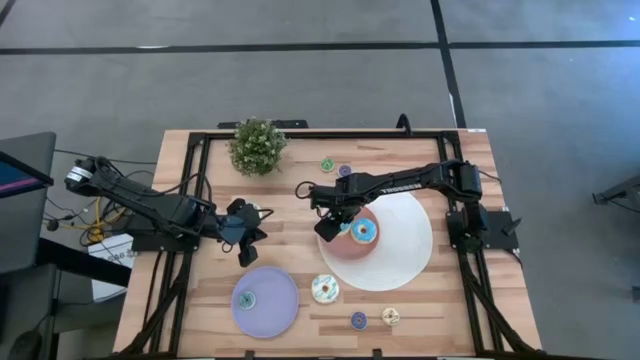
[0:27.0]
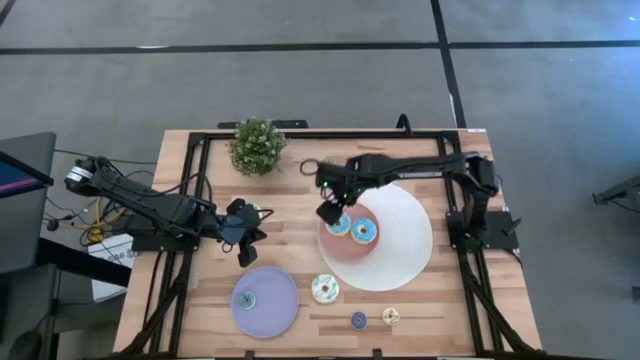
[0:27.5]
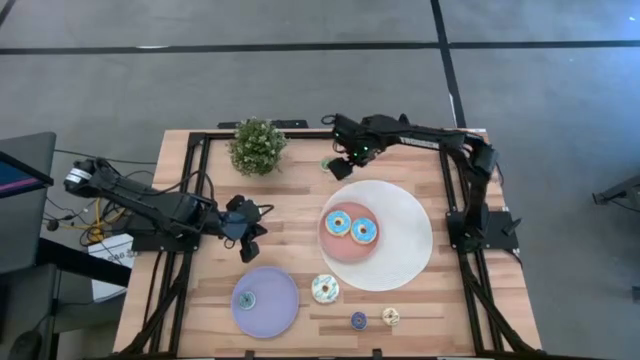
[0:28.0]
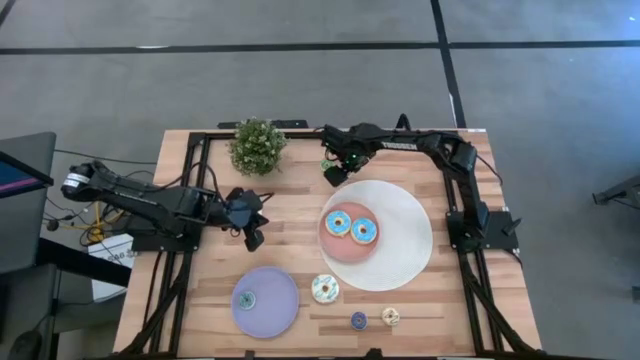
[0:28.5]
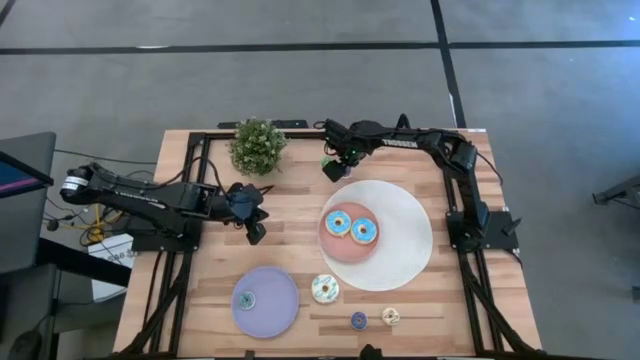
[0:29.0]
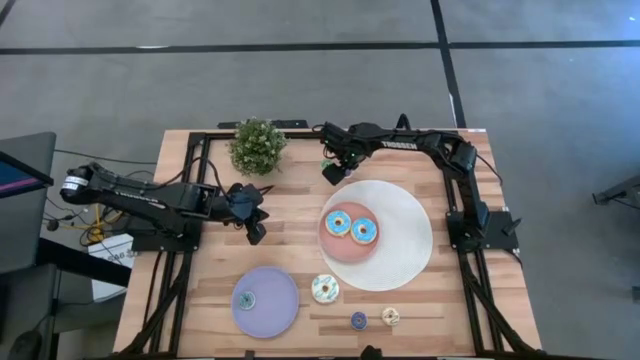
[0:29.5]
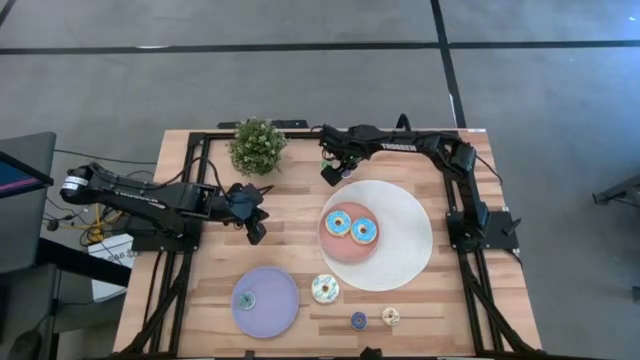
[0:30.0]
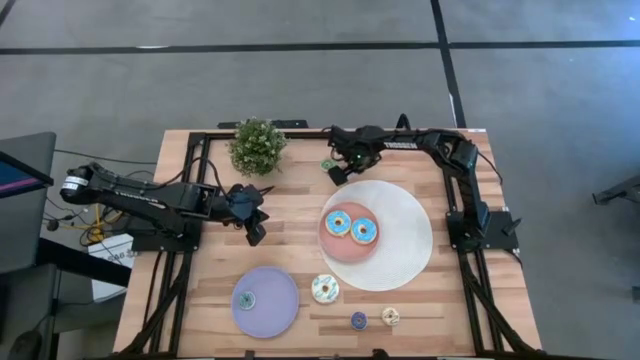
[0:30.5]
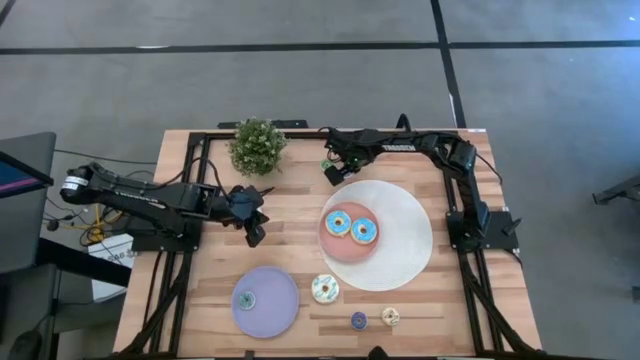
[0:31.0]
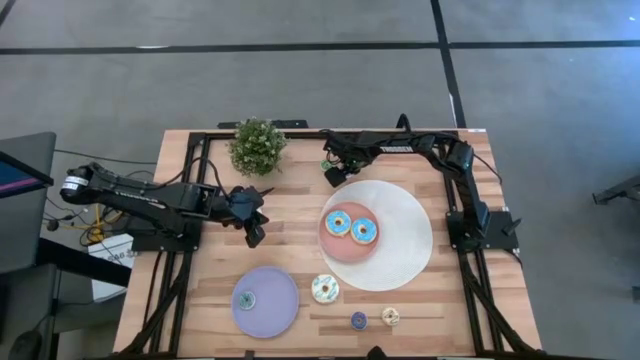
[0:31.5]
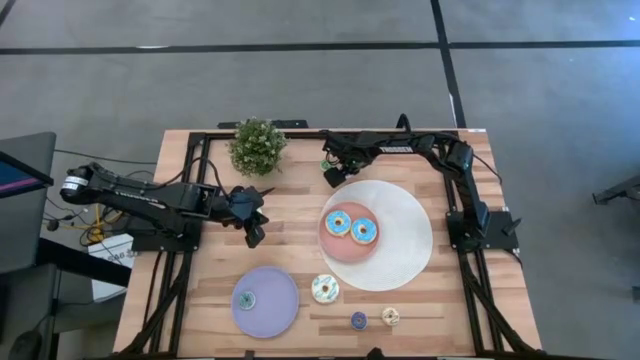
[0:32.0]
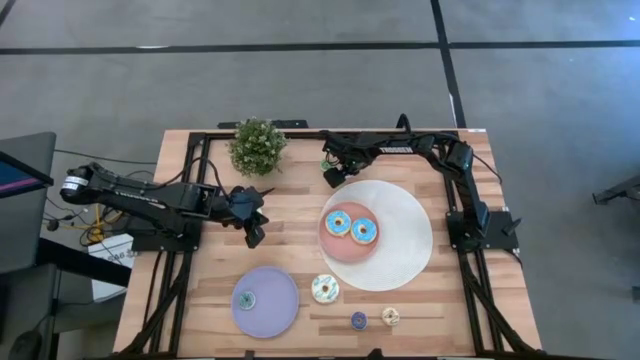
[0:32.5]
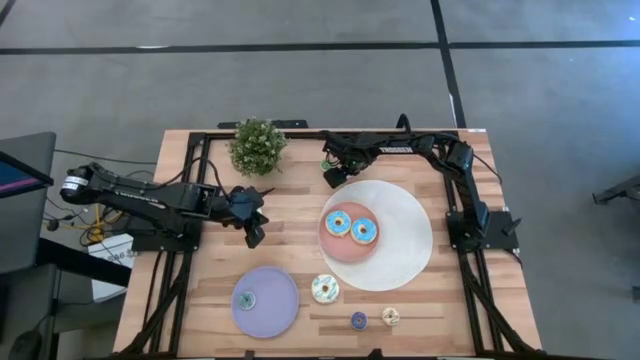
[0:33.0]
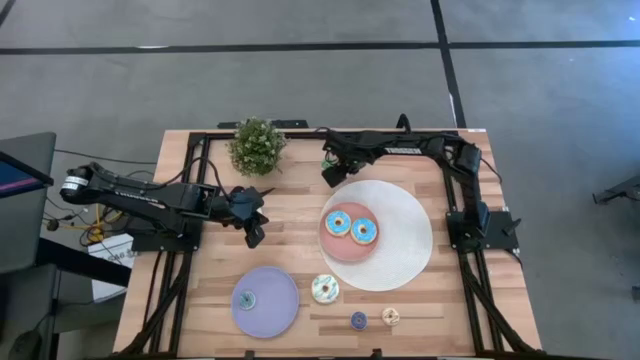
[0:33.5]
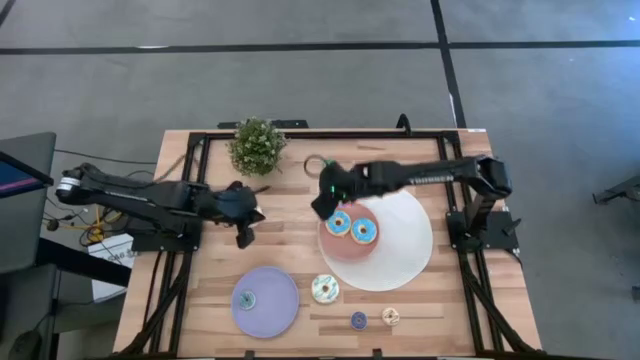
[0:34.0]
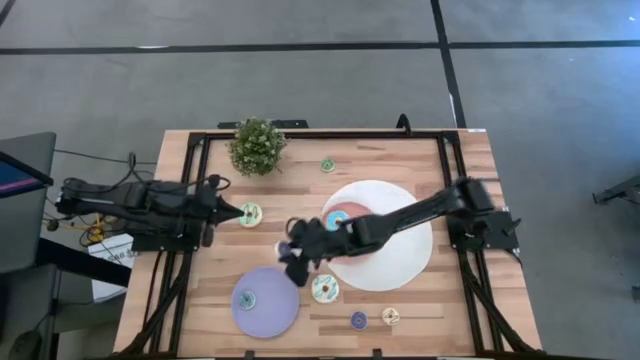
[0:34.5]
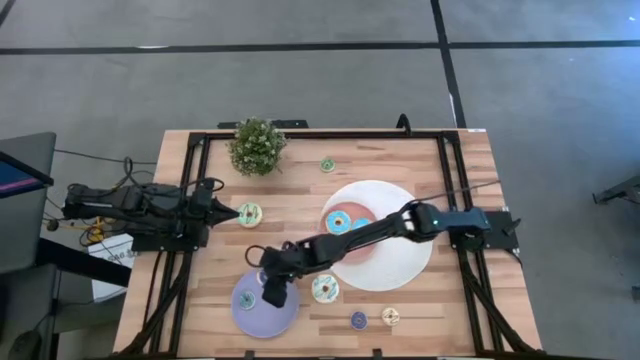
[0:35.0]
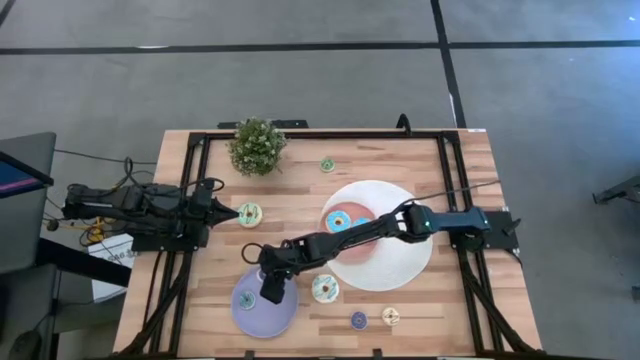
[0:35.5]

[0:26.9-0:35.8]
Task: Pick & Place donuts
Put the small blue donut on the purple plate

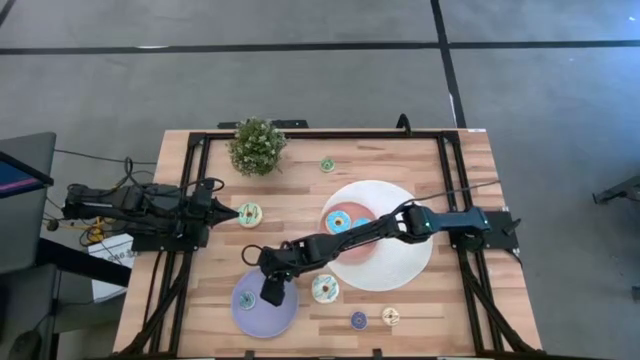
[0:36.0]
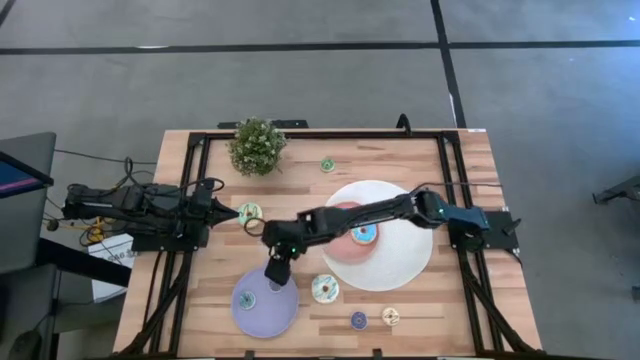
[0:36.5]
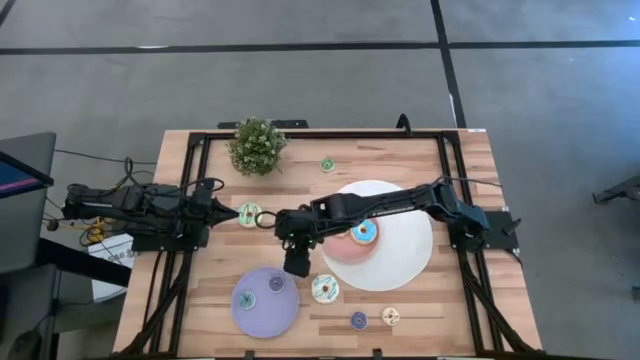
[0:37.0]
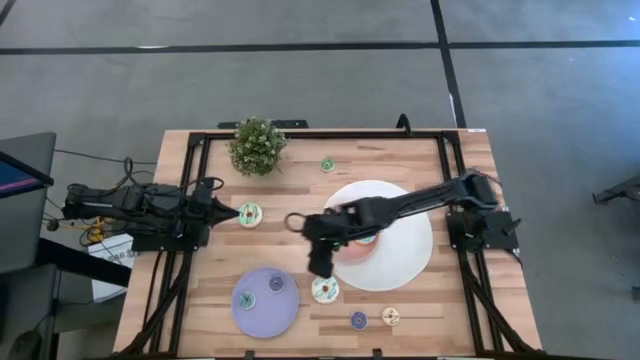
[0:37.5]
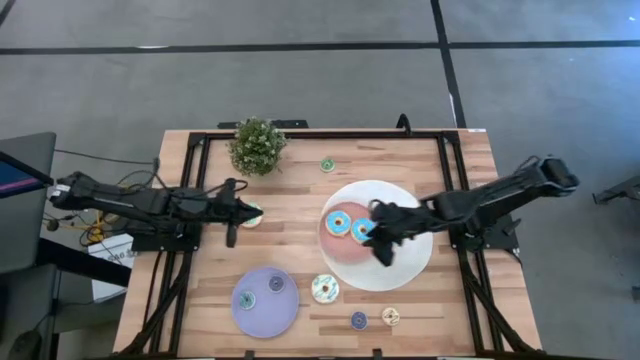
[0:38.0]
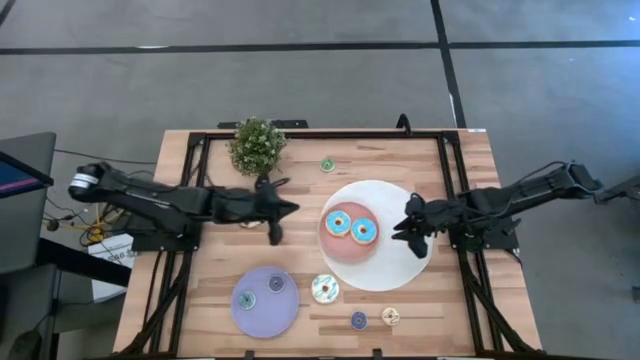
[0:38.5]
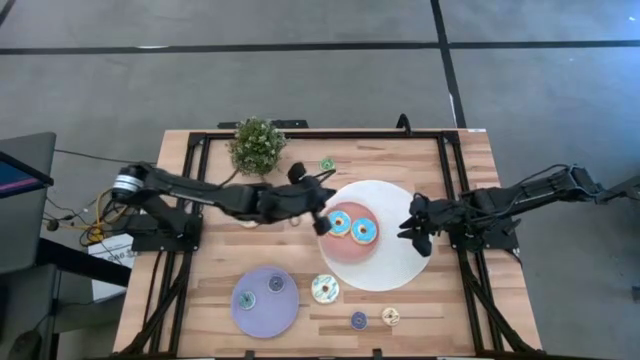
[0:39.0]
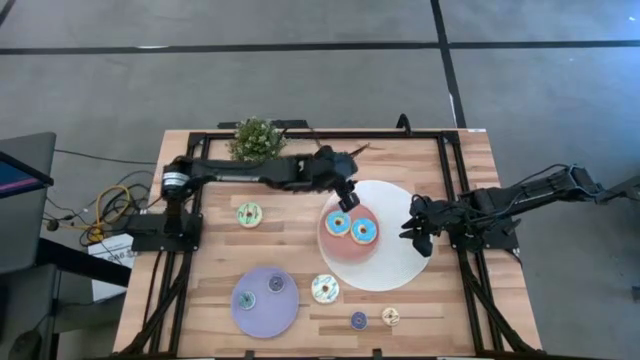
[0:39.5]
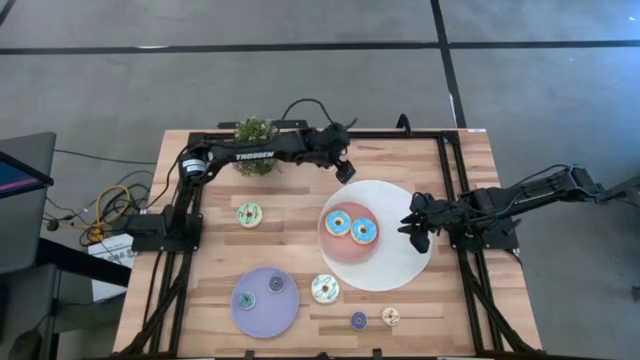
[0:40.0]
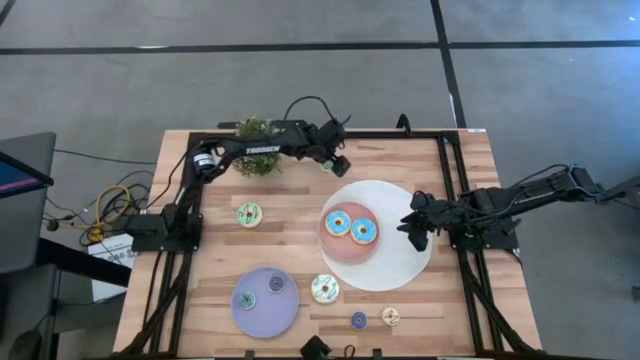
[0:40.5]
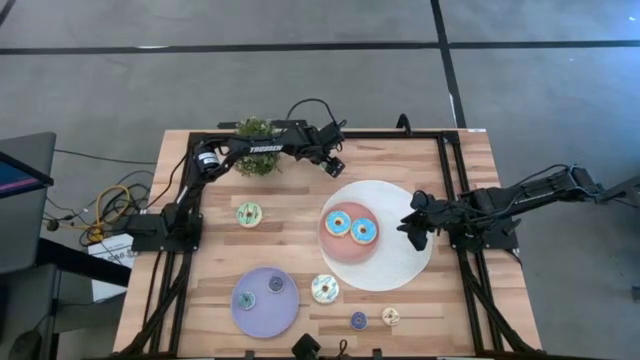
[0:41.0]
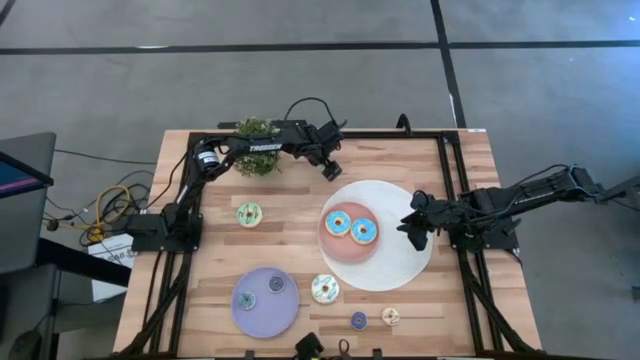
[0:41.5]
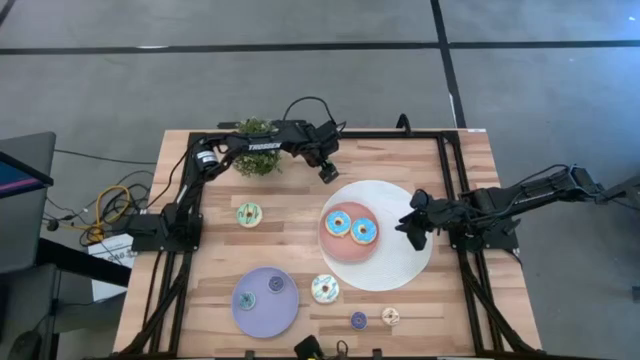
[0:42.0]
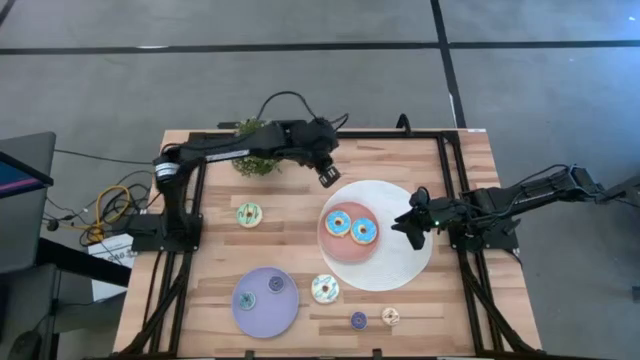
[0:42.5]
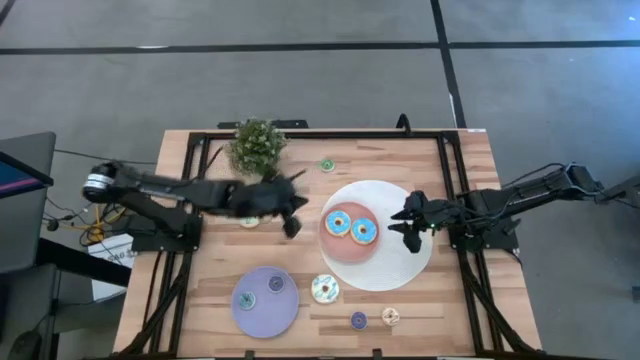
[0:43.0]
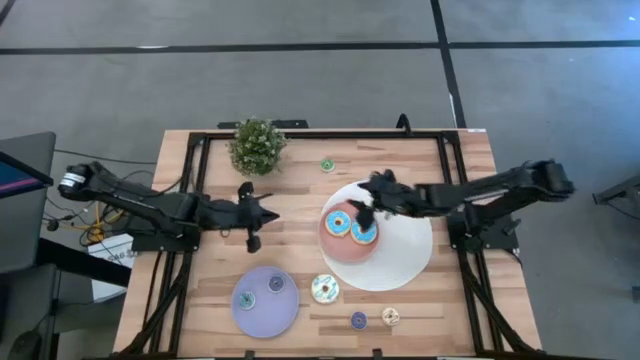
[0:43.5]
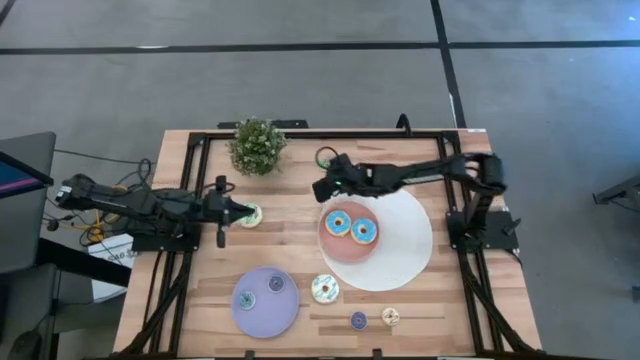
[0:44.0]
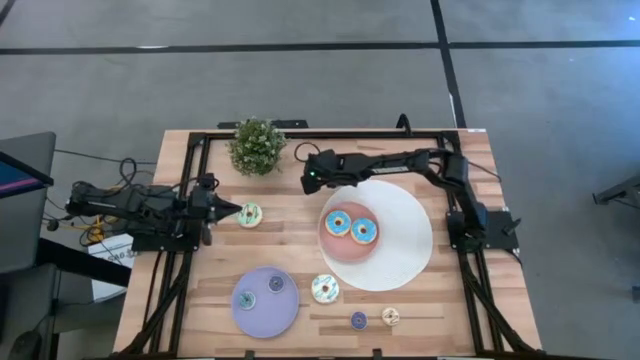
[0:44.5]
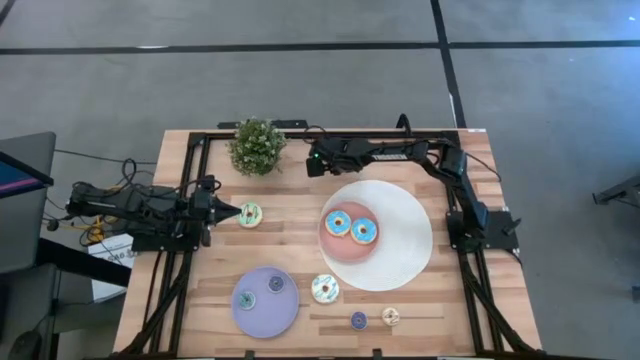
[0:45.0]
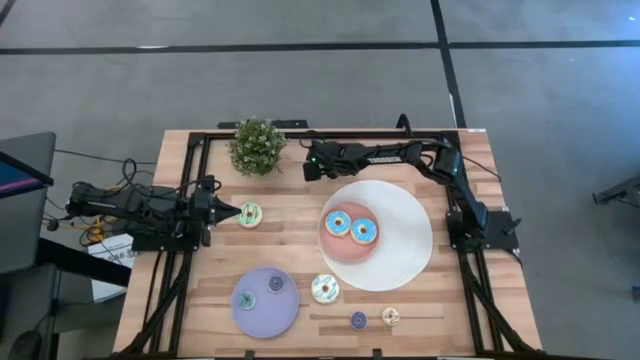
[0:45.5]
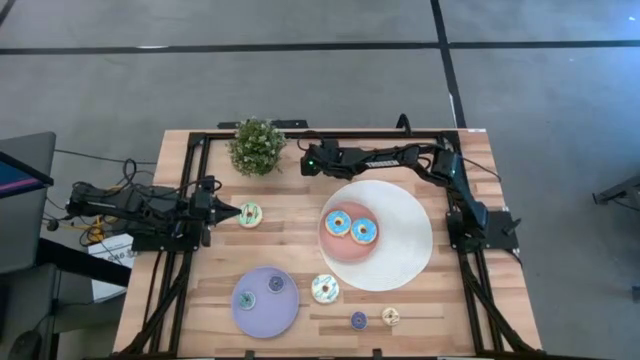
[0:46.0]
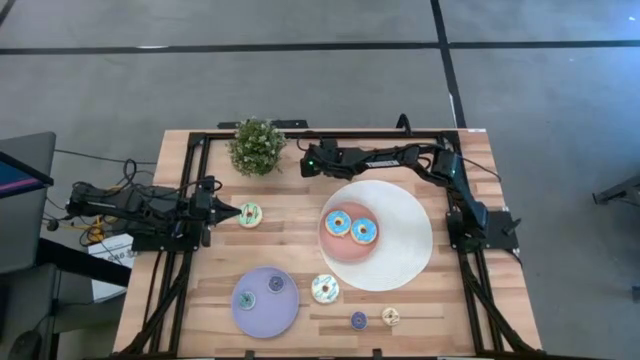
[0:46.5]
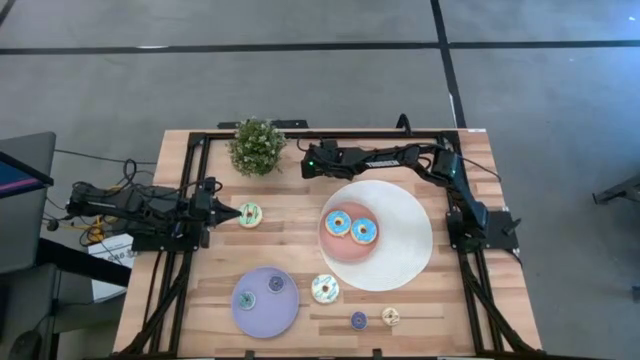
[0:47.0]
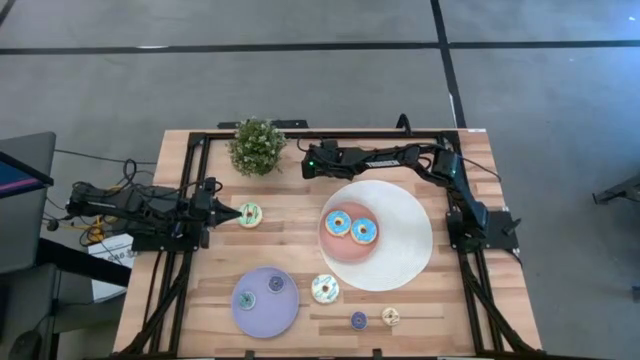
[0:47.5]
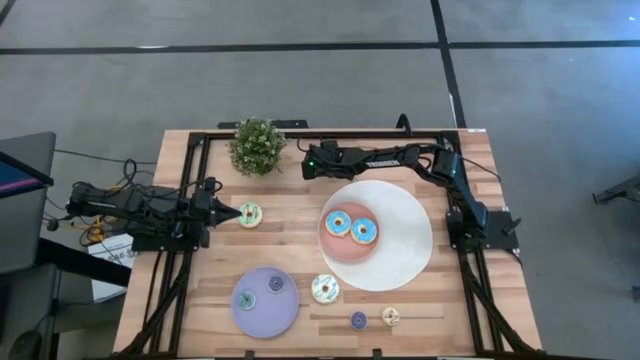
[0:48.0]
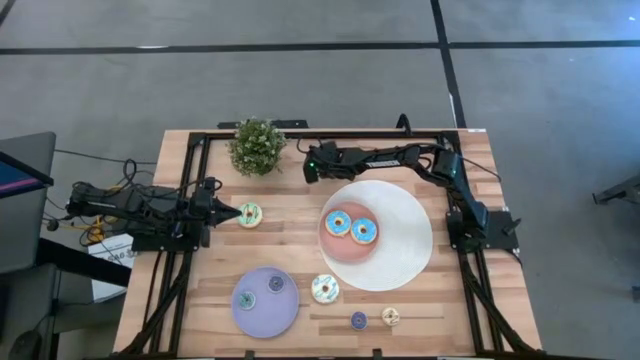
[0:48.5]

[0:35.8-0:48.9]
Put the small green donut on the purple plate
